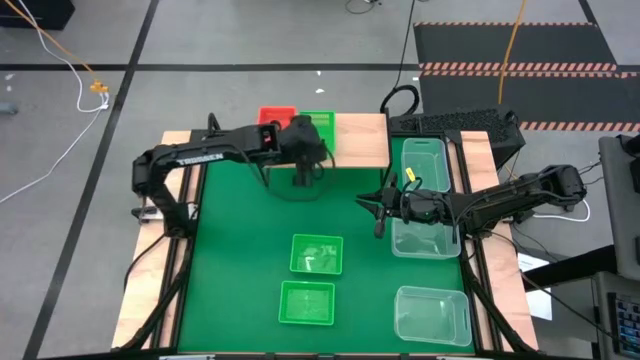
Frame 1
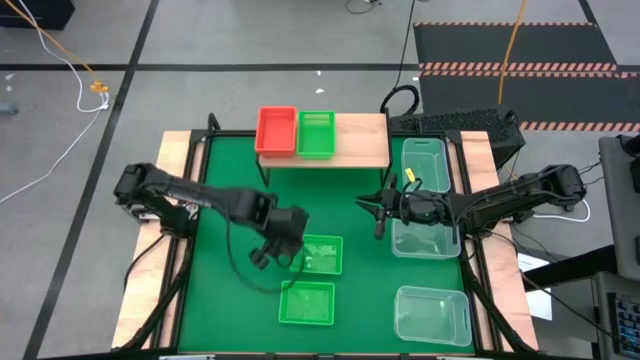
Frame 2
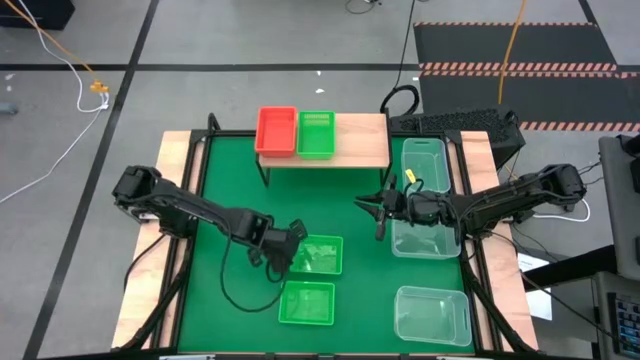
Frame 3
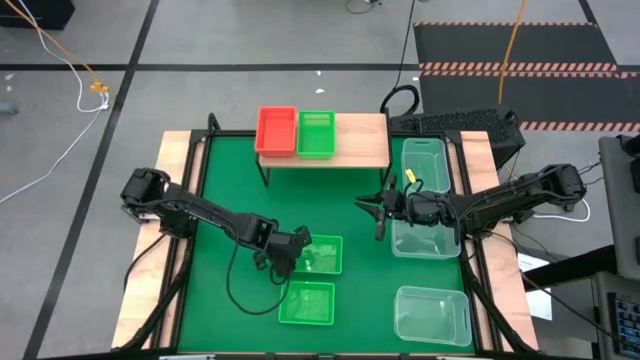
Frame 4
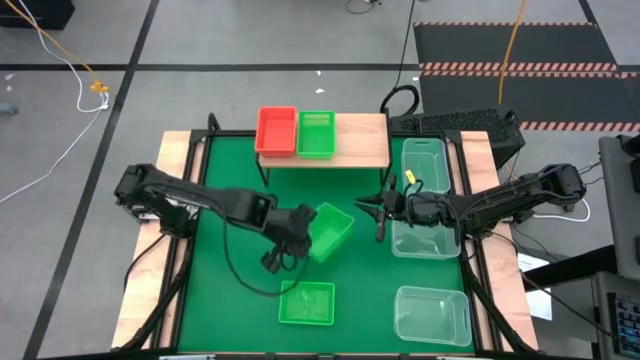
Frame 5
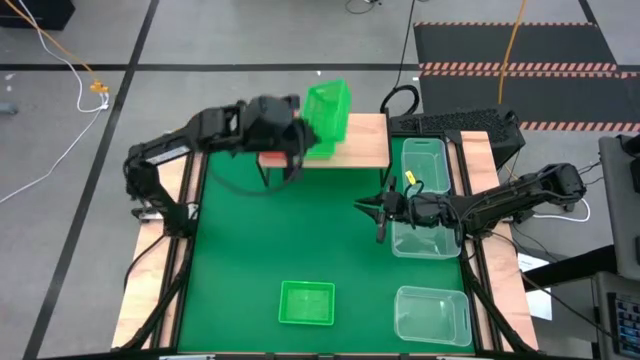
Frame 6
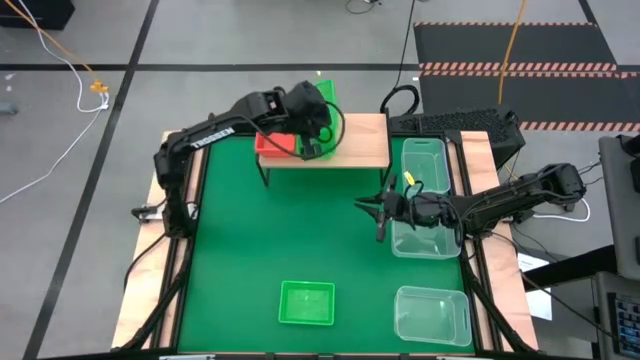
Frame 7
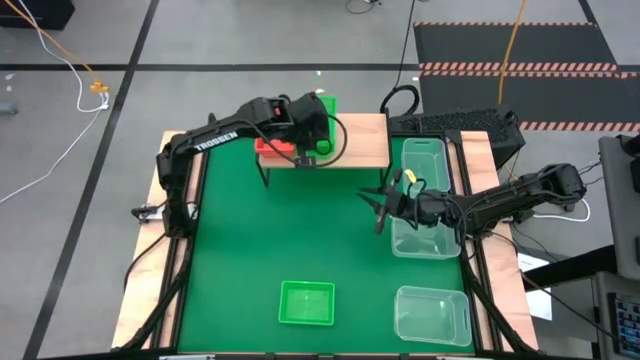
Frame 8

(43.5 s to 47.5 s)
Task: Stack baskets on shelf by color
Stack the top green bin on the green bin on the shelf

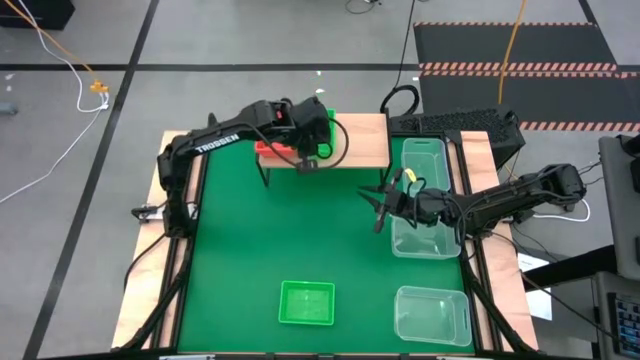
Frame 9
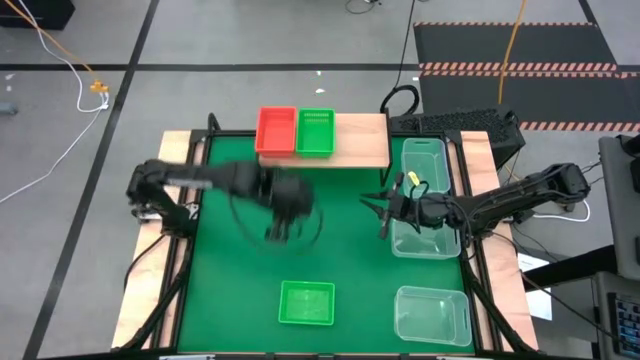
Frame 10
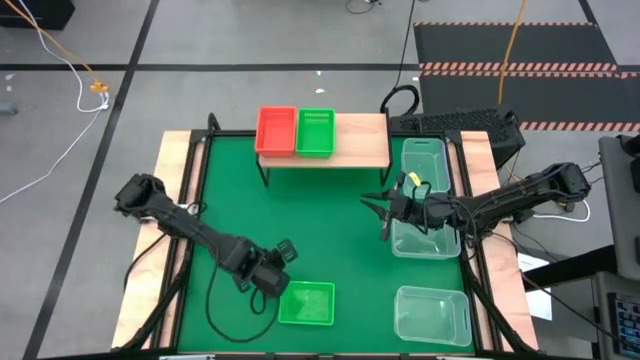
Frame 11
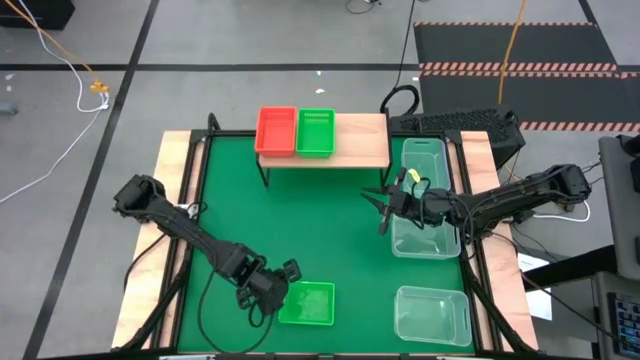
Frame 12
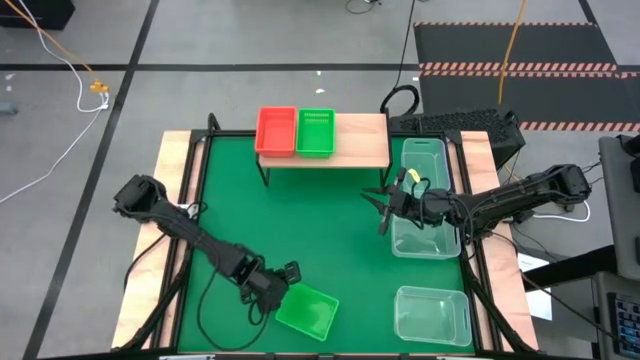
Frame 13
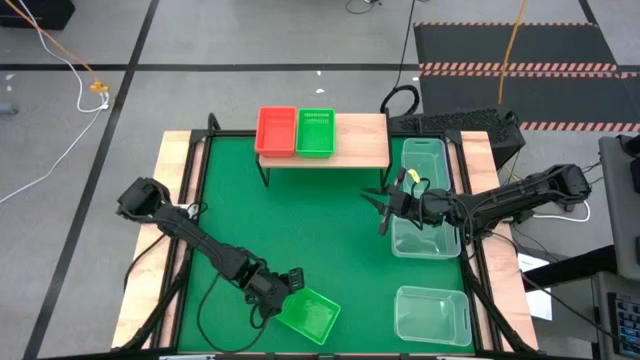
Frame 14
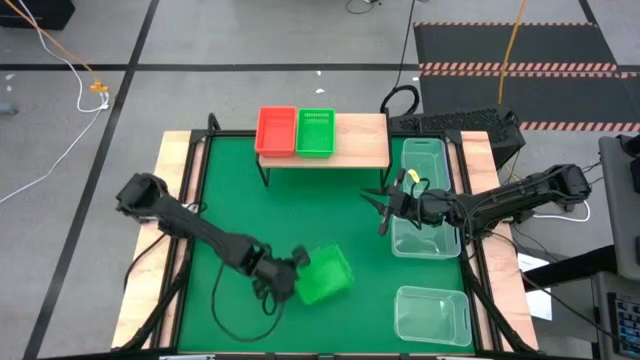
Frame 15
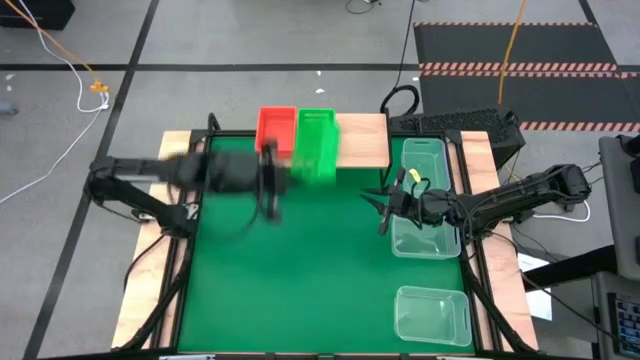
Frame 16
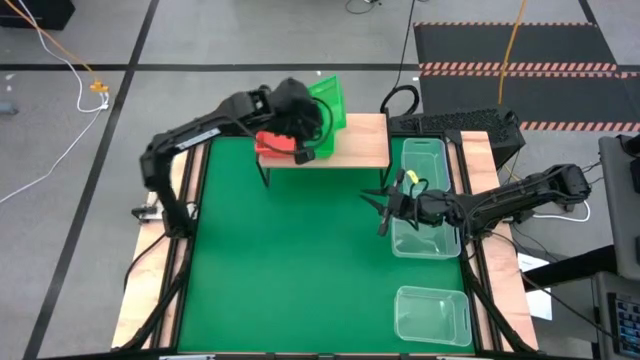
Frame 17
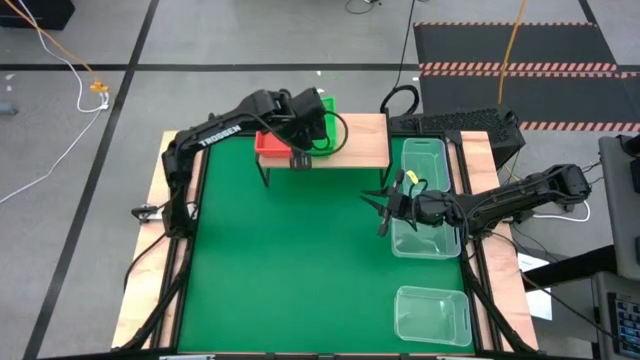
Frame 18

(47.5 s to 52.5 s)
Stack the green bin on the green bin on the shelf

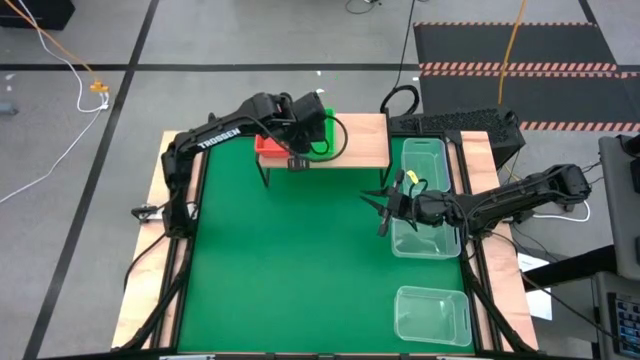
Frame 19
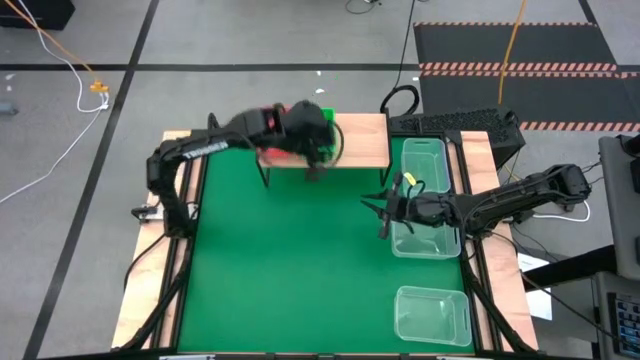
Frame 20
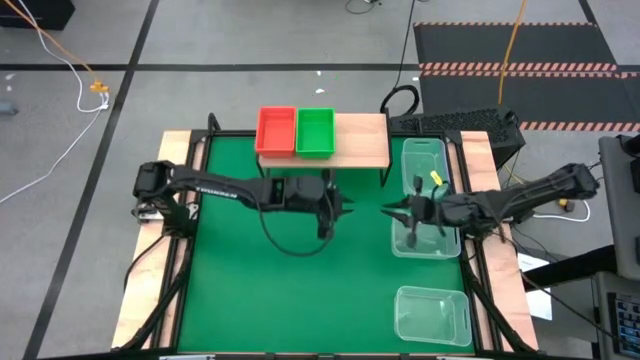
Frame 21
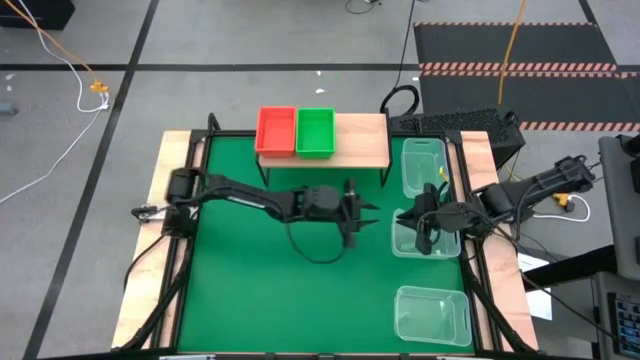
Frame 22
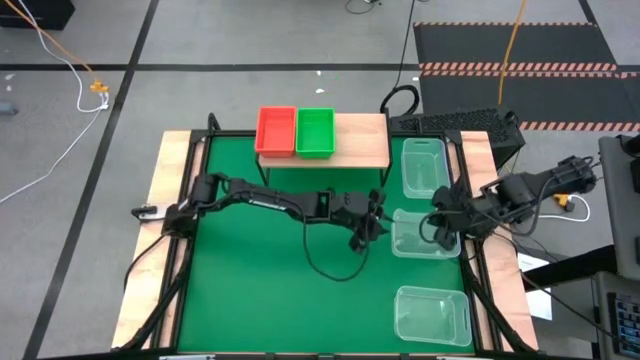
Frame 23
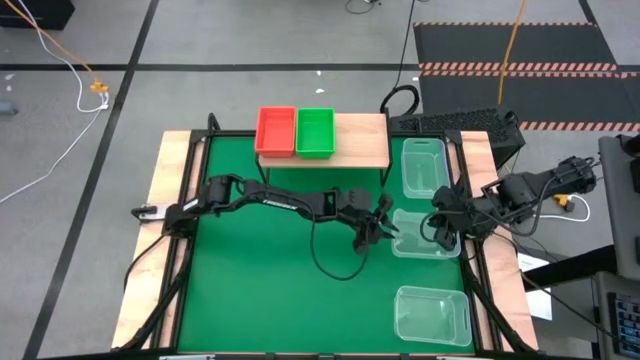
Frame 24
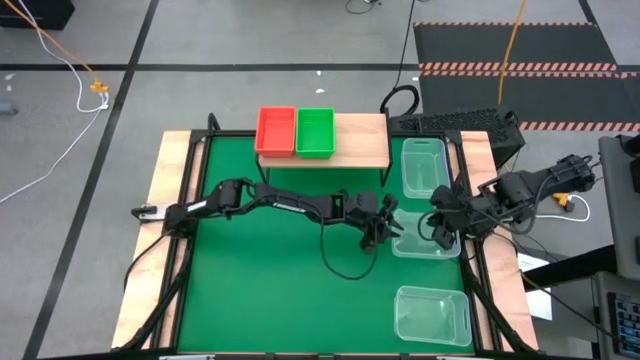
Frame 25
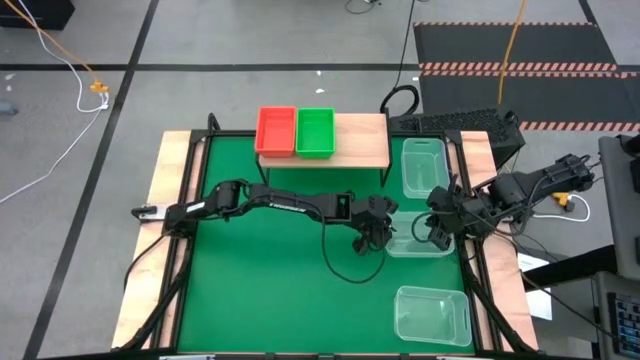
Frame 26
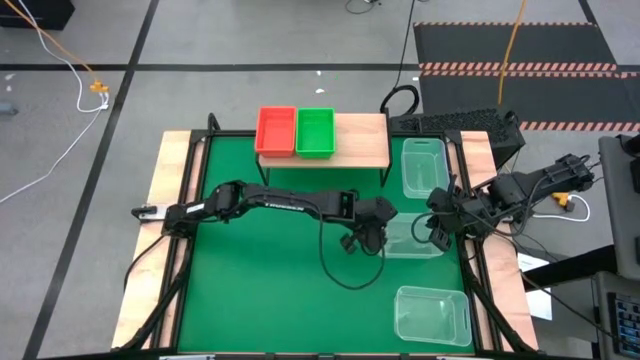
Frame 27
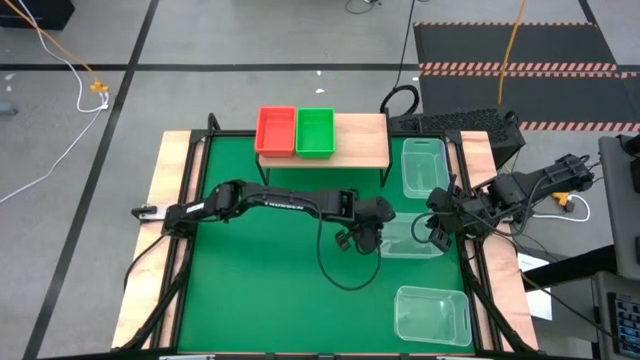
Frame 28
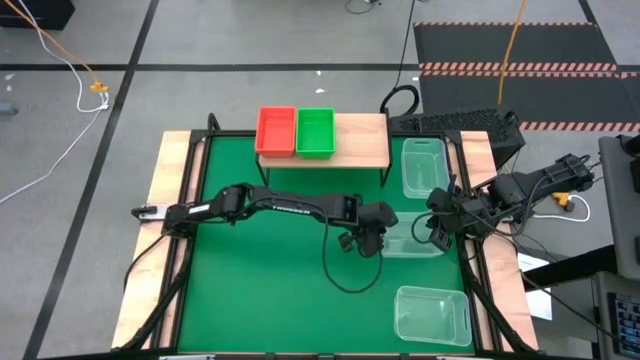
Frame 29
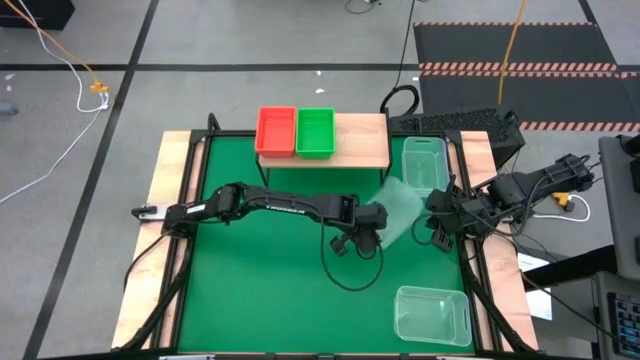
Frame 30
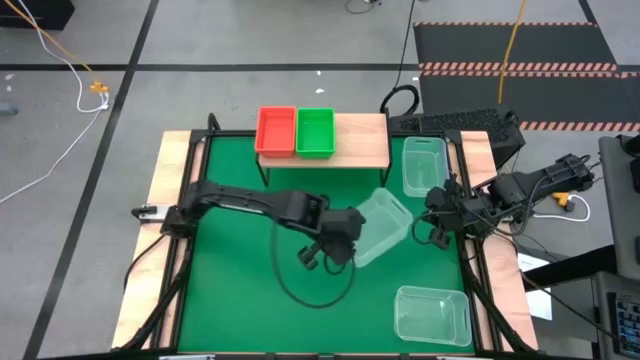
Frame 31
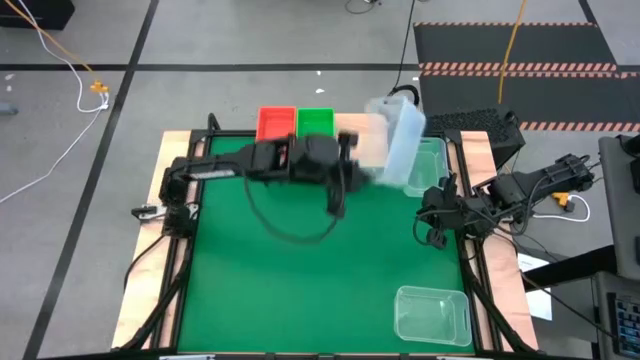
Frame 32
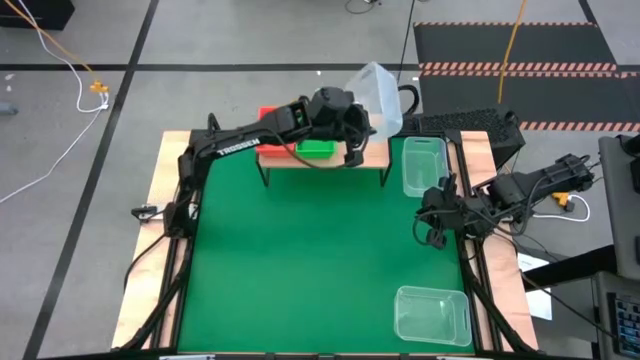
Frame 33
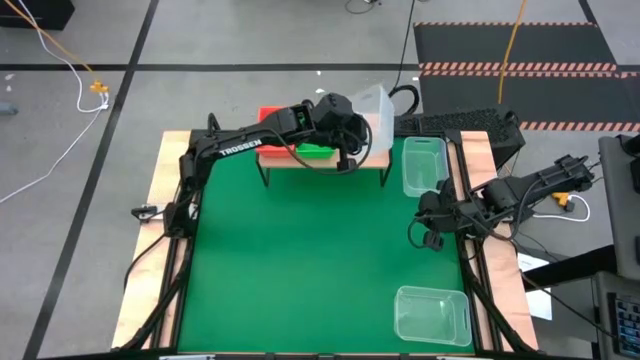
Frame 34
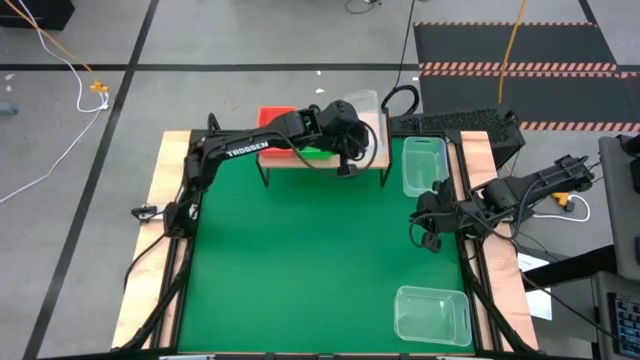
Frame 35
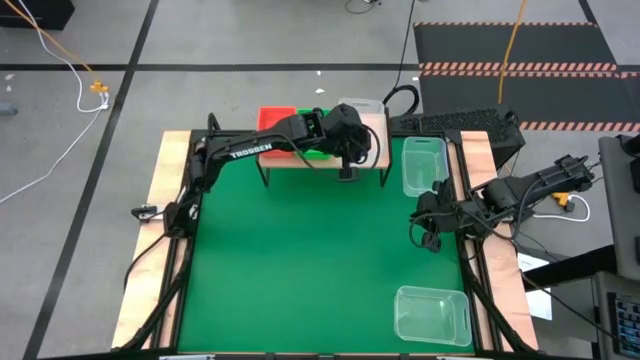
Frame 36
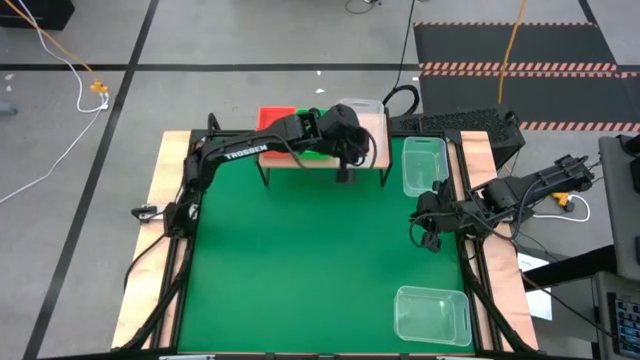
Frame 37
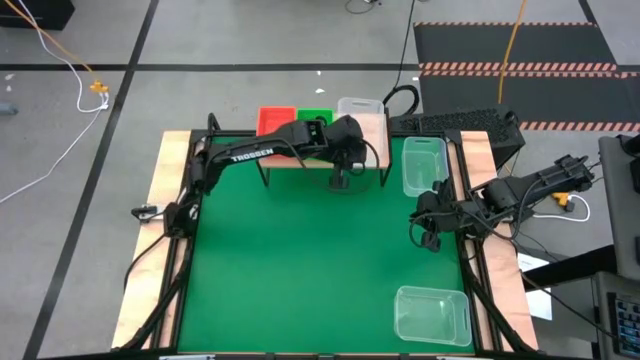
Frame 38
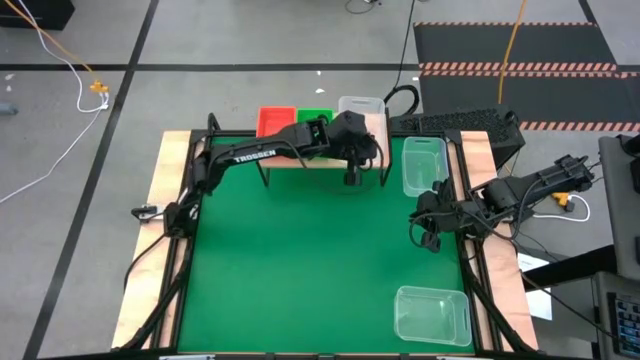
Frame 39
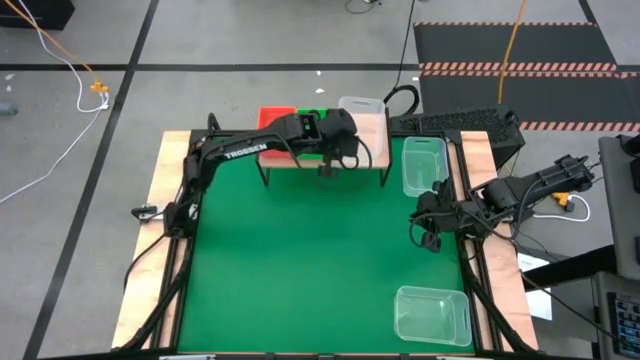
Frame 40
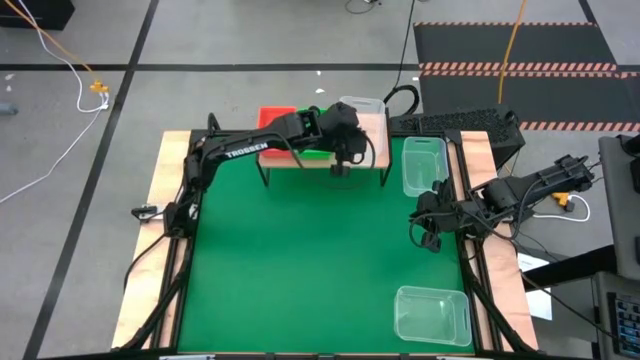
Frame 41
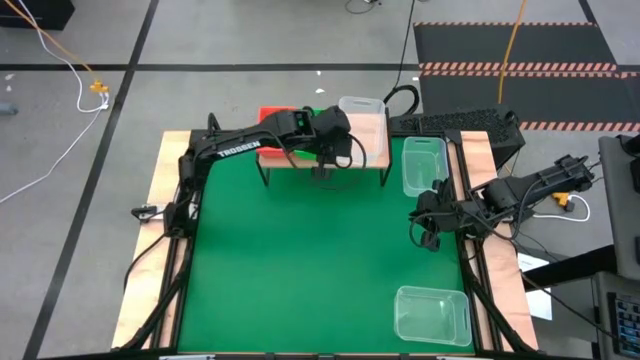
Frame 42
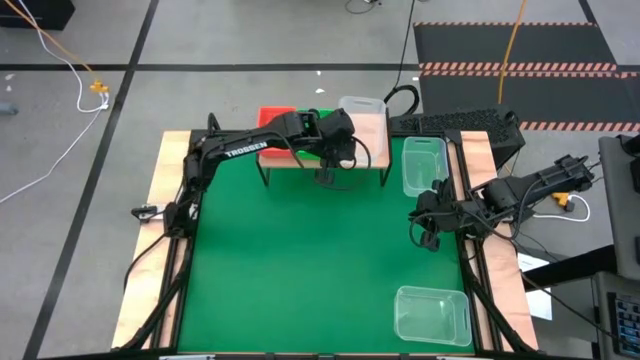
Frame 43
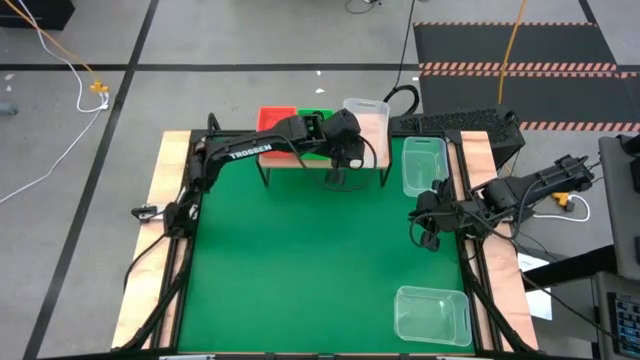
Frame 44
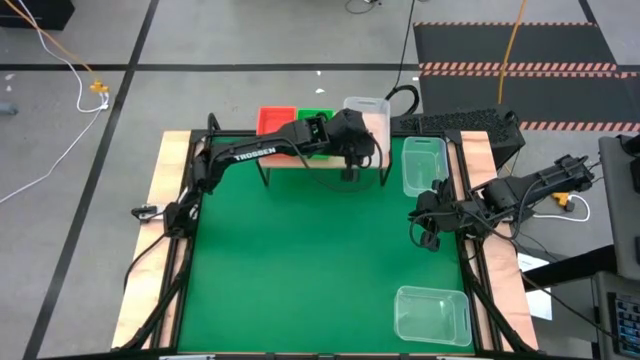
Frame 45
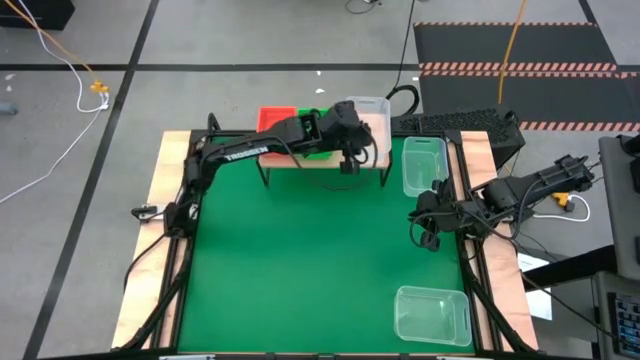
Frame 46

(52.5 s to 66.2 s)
Put the middle transparent bin on the shelf
